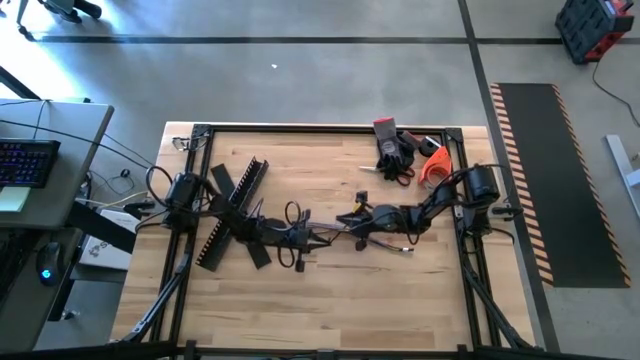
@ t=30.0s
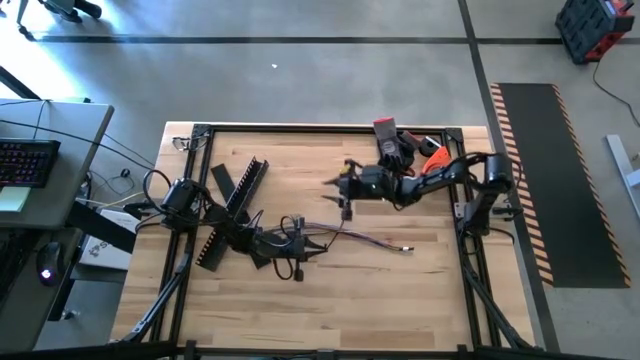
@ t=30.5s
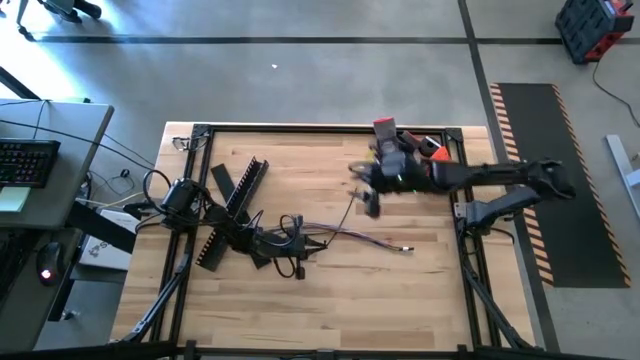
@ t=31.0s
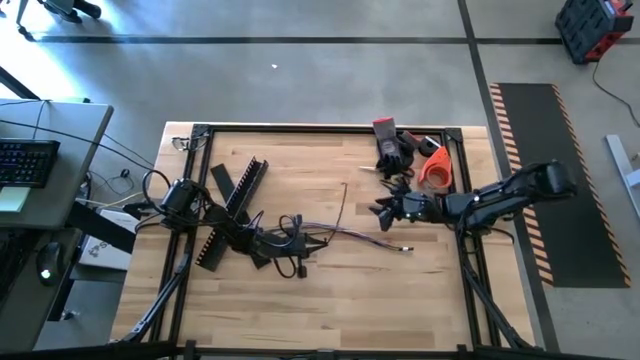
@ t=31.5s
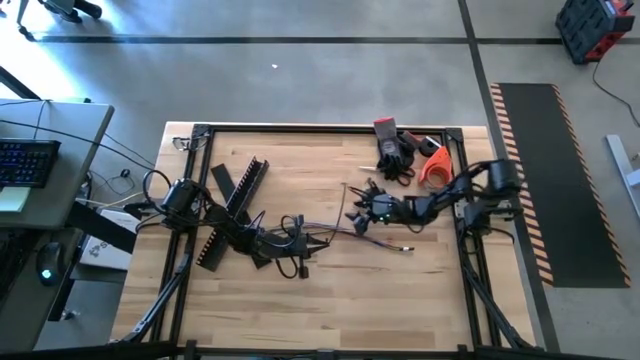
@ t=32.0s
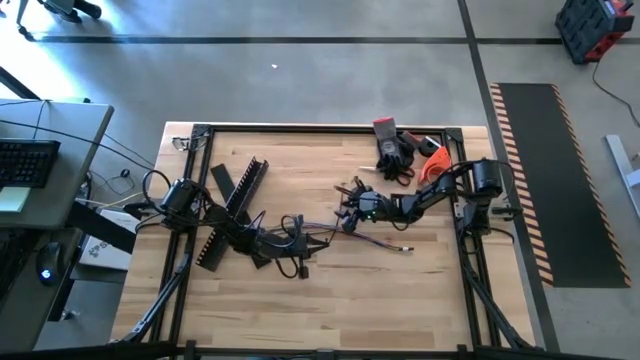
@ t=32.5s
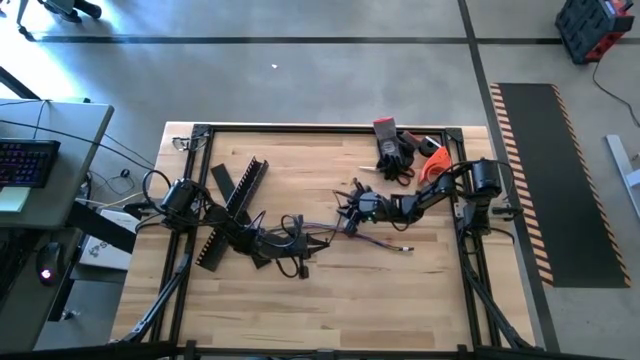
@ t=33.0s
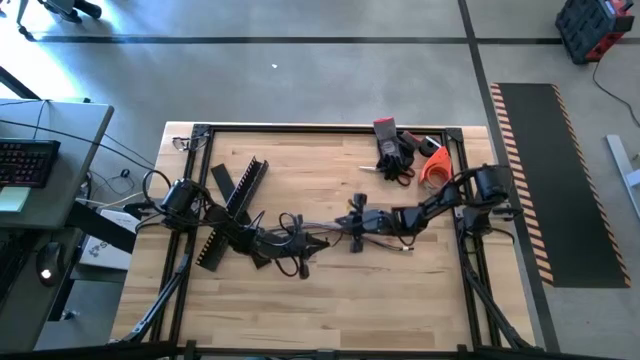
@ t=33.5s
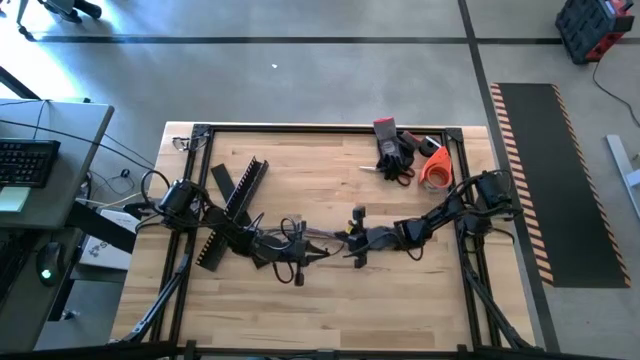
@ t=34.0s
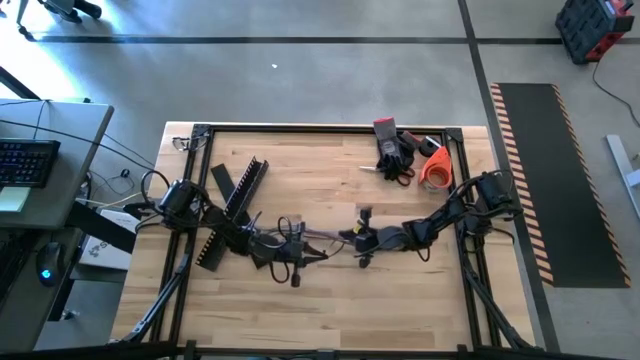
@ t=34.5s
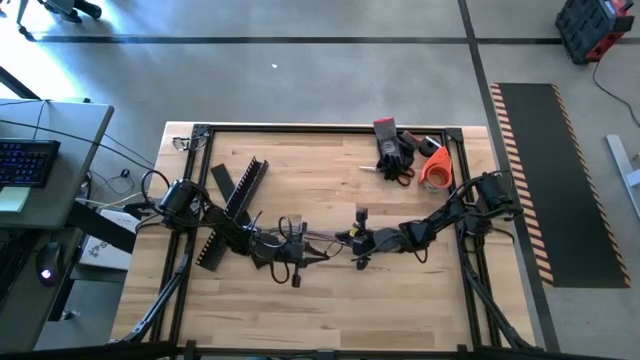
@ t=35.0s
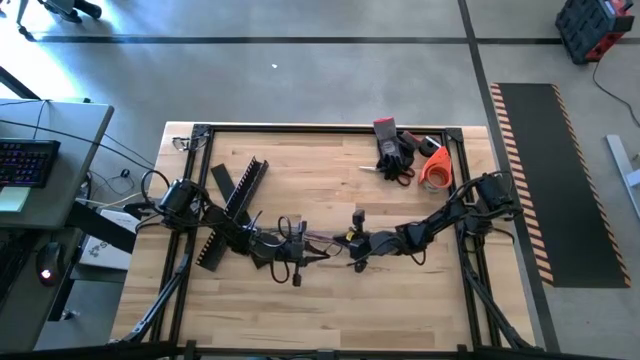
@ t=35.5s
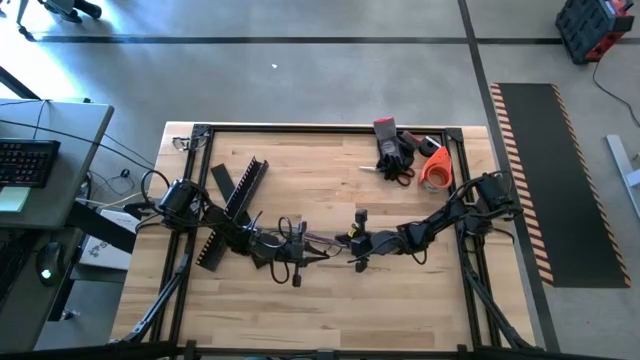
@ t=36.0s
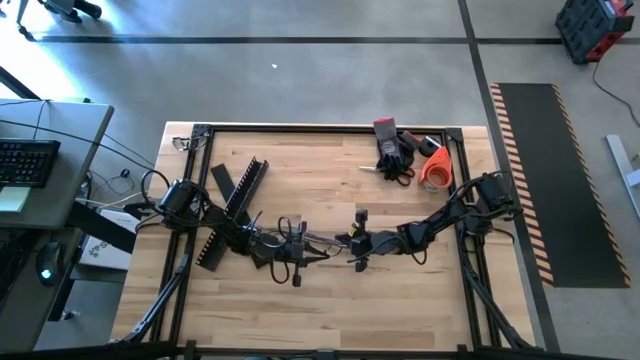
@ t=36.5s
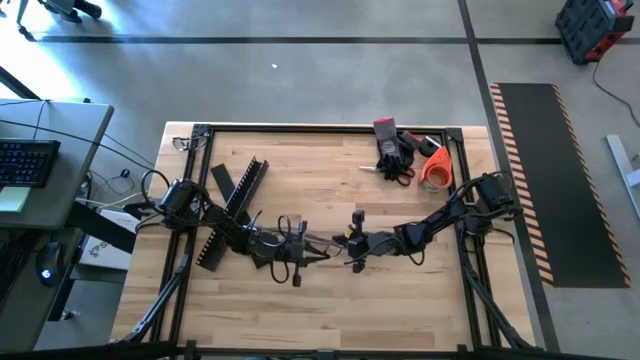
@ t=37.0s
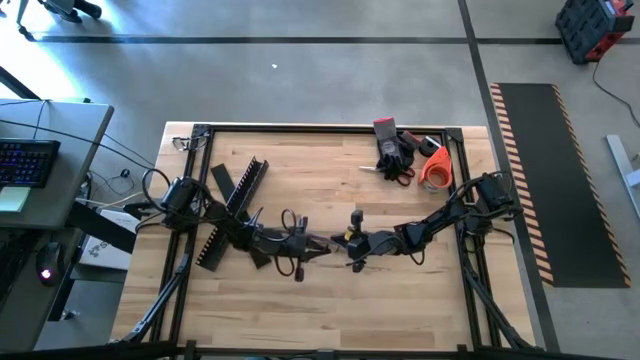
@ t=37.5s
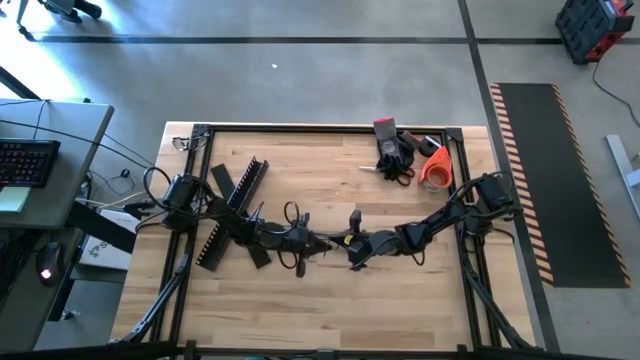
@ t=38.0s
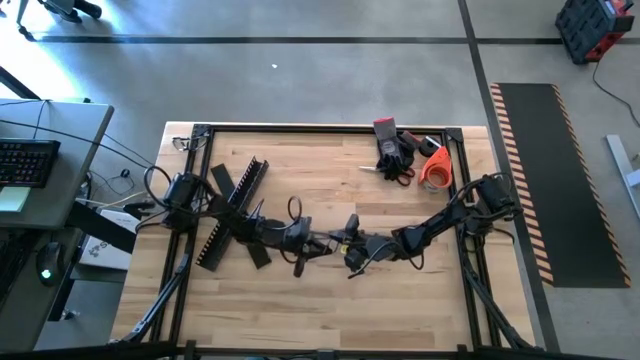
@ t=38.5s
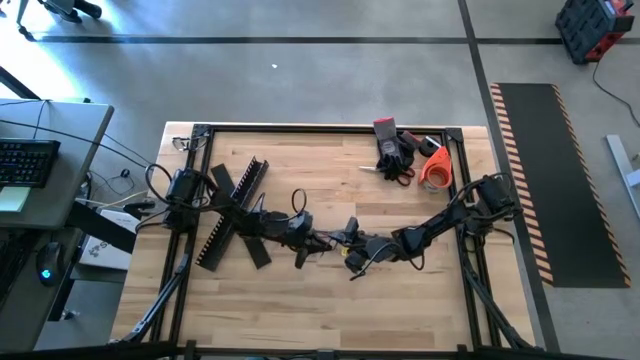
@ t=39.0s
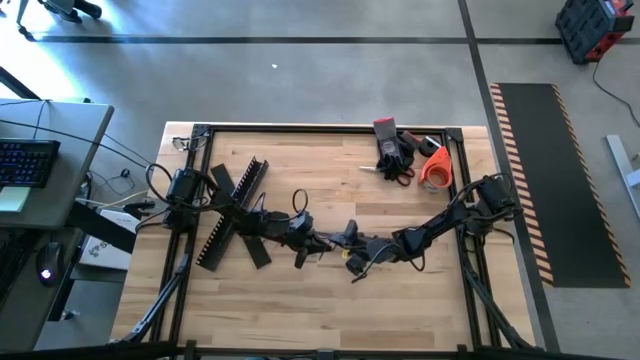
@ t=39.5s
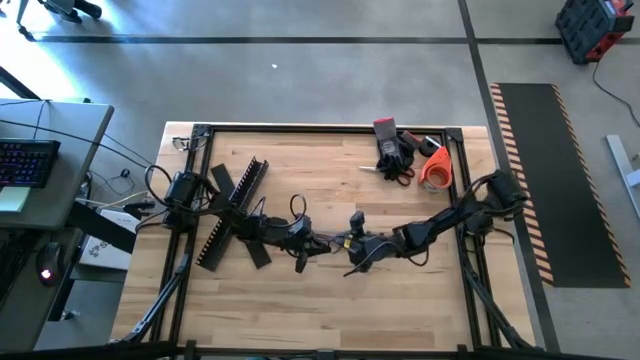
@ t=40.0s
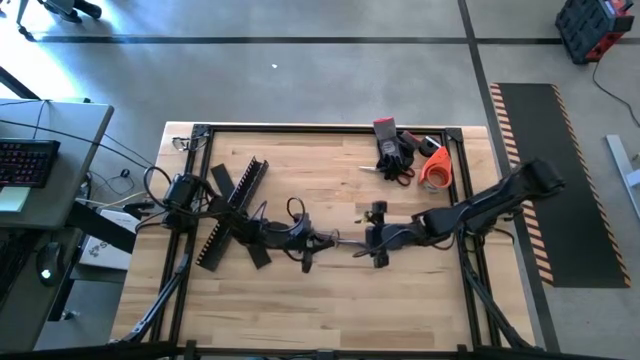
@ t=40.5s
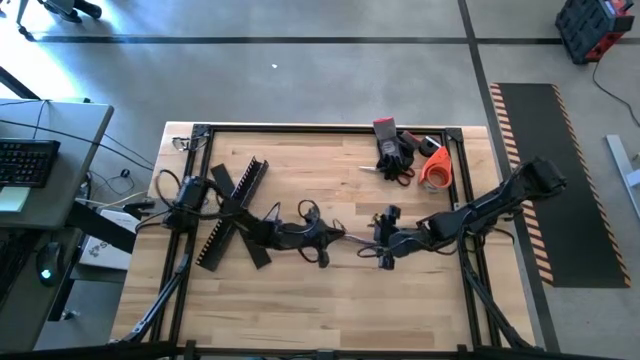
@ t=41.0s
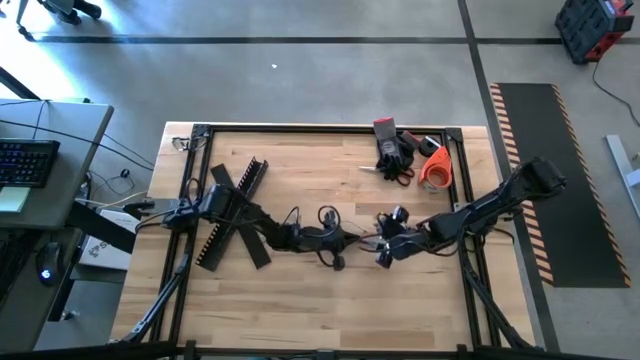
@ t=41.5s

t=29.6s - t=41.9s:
Task: Ziptie cables
Wrap the cable wires with the black zip tie

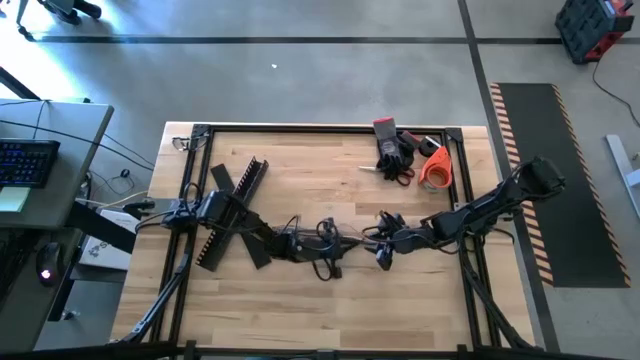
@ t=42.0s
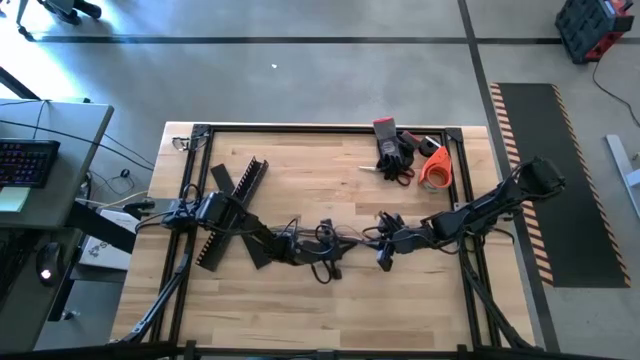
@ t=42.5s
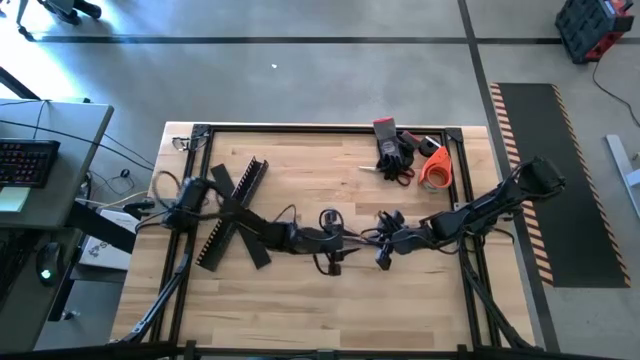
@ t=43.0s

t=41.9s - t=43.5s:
Wrap the cable wires with the black zip tie
